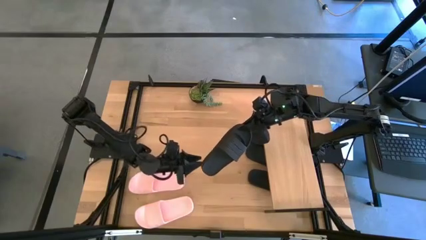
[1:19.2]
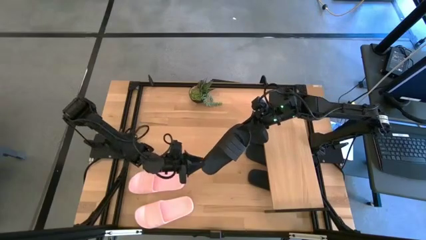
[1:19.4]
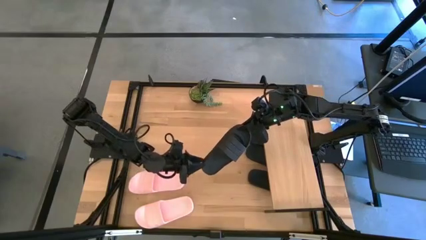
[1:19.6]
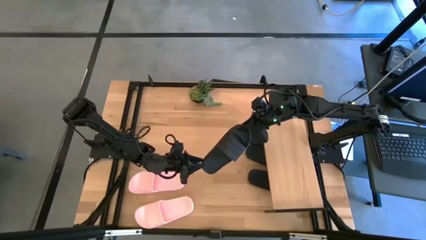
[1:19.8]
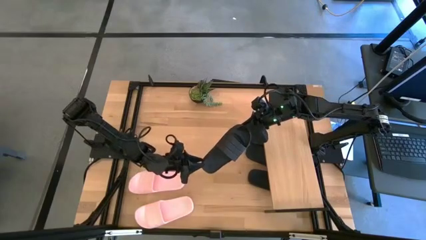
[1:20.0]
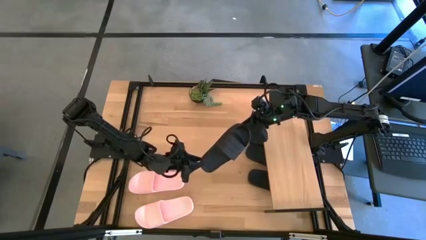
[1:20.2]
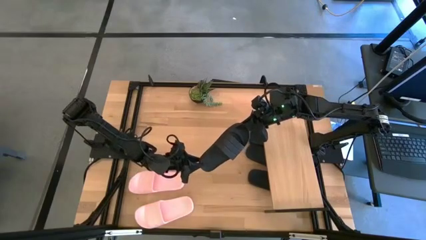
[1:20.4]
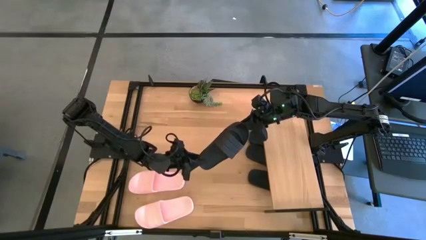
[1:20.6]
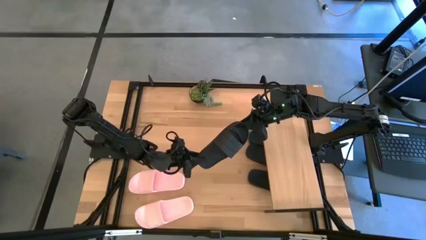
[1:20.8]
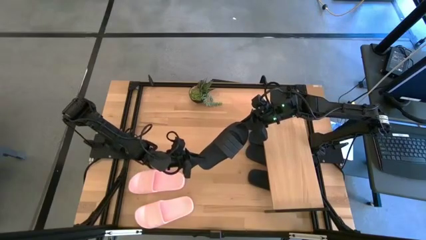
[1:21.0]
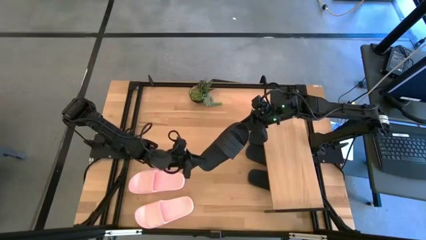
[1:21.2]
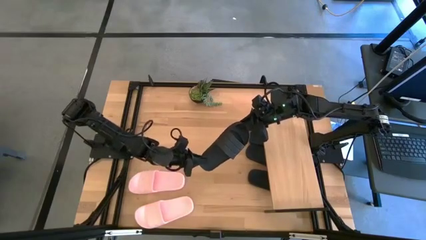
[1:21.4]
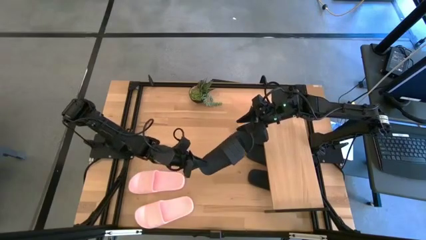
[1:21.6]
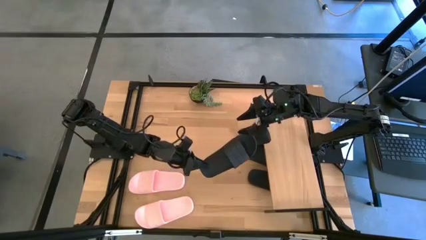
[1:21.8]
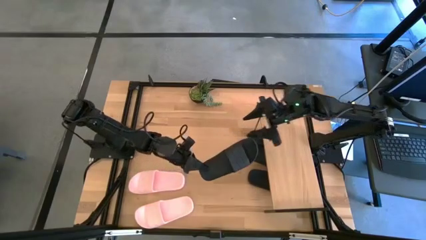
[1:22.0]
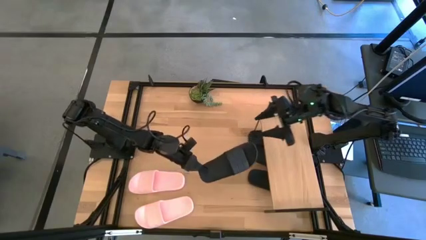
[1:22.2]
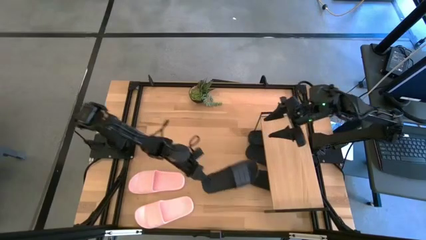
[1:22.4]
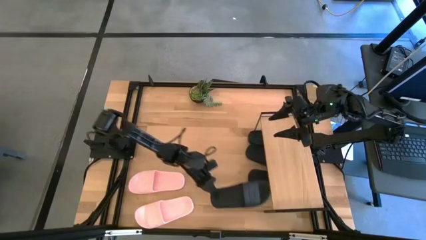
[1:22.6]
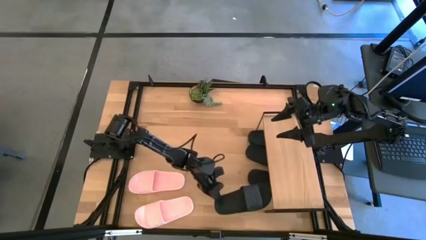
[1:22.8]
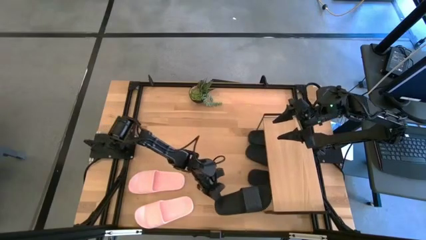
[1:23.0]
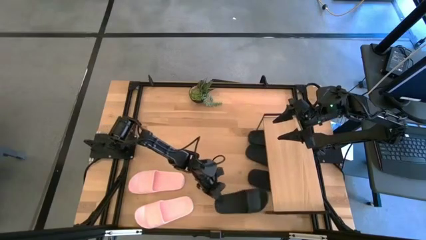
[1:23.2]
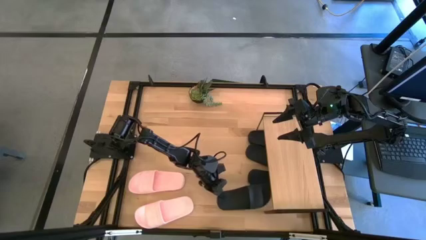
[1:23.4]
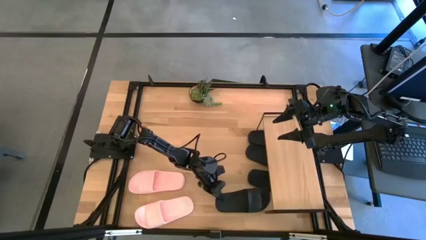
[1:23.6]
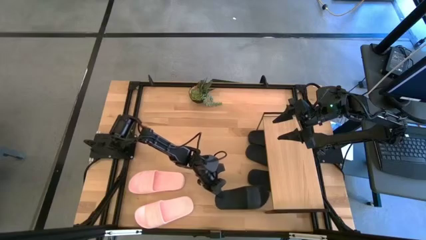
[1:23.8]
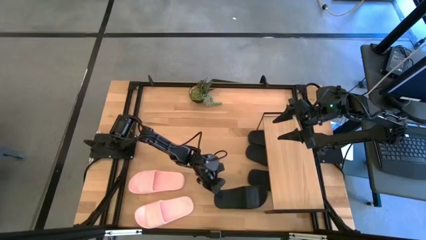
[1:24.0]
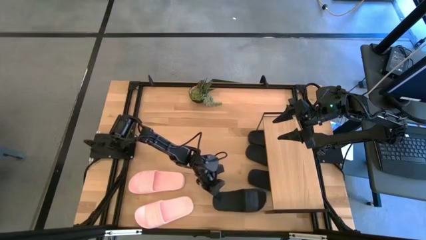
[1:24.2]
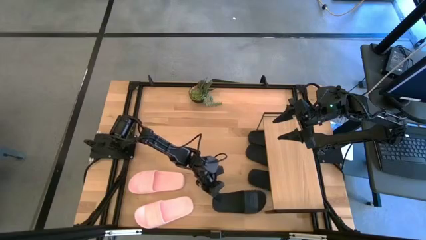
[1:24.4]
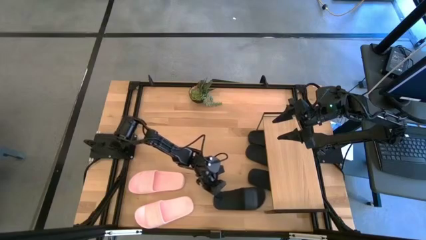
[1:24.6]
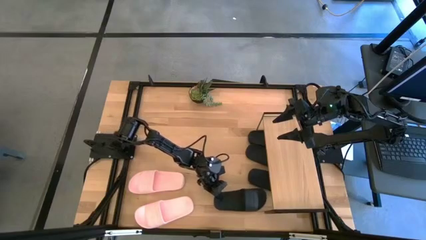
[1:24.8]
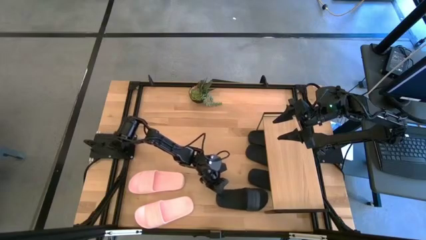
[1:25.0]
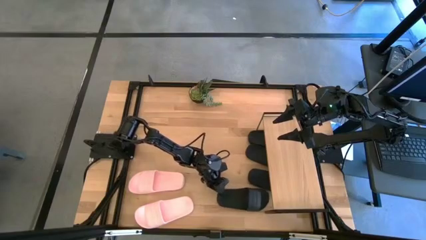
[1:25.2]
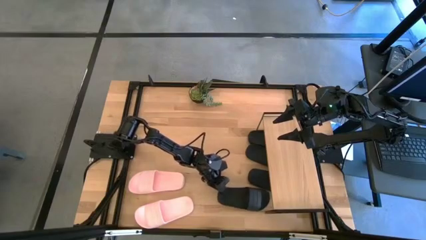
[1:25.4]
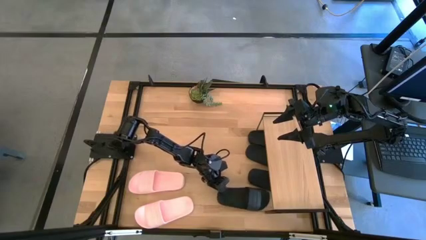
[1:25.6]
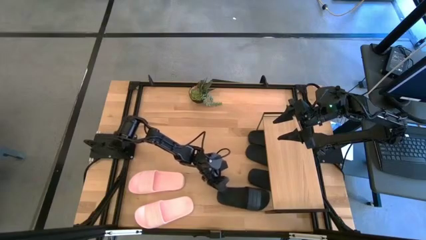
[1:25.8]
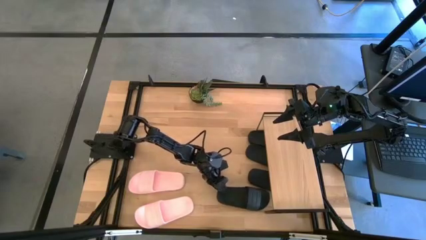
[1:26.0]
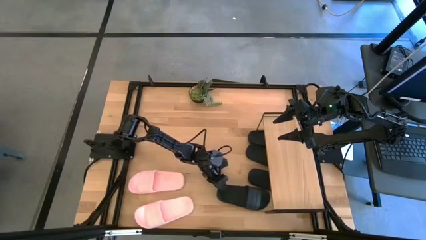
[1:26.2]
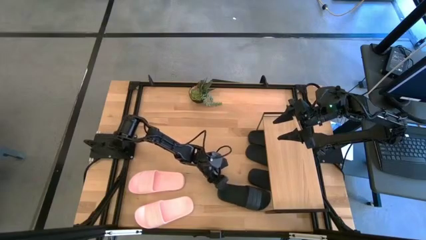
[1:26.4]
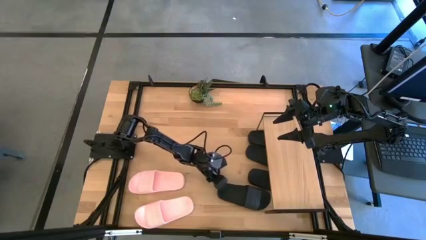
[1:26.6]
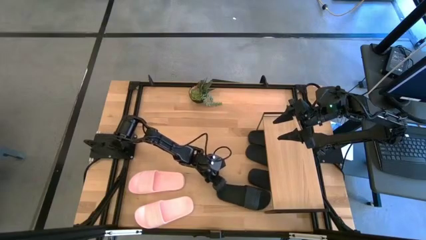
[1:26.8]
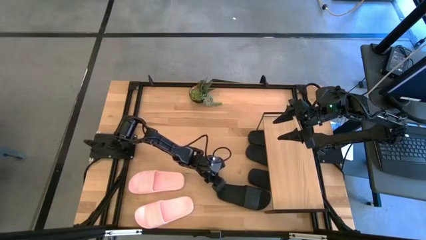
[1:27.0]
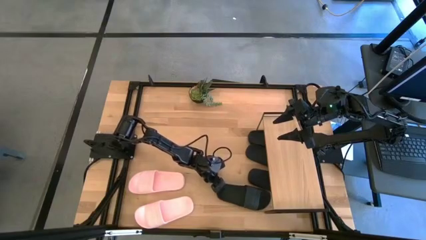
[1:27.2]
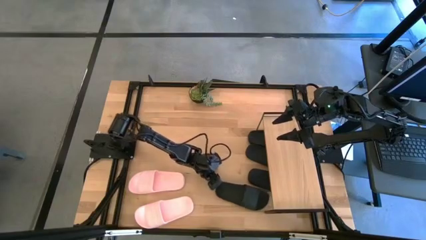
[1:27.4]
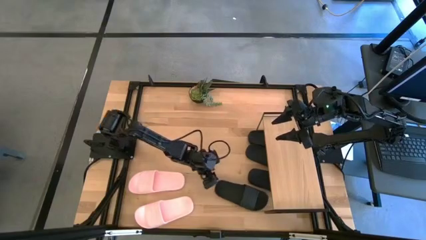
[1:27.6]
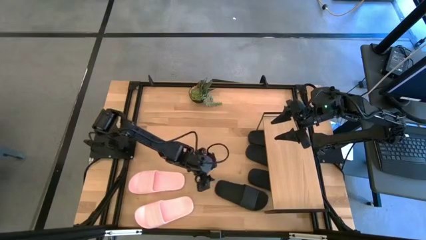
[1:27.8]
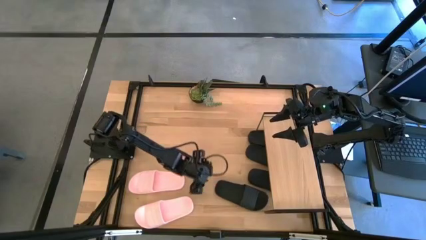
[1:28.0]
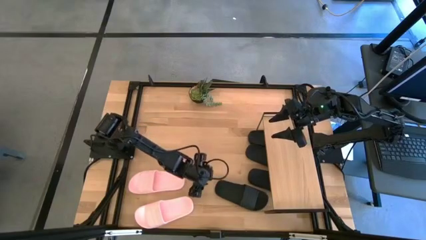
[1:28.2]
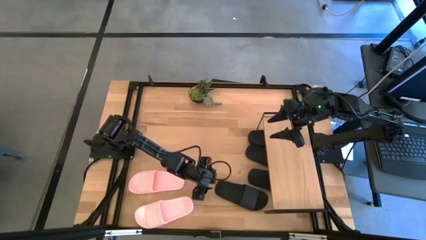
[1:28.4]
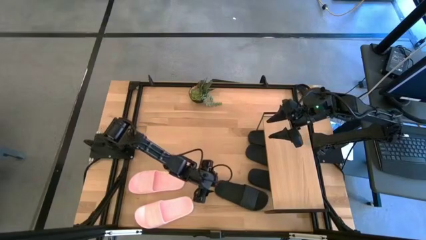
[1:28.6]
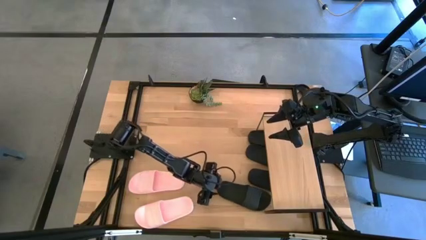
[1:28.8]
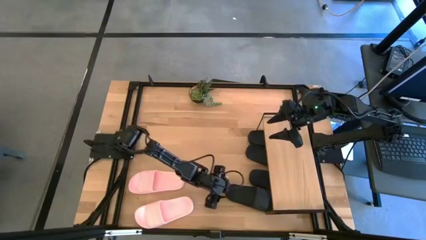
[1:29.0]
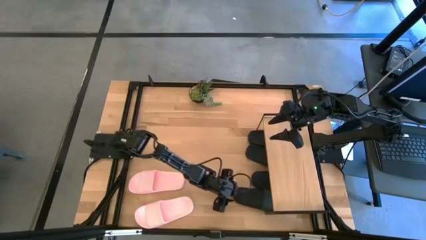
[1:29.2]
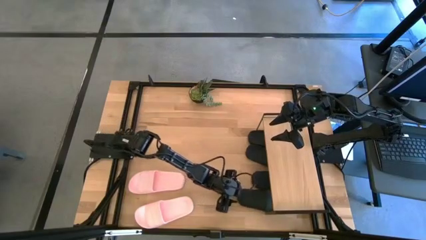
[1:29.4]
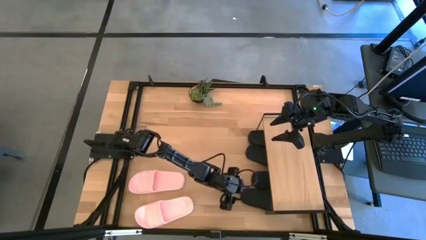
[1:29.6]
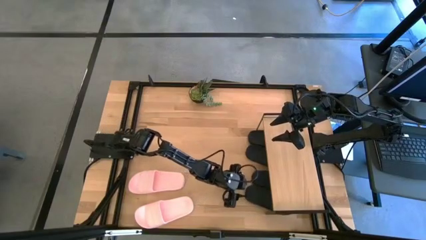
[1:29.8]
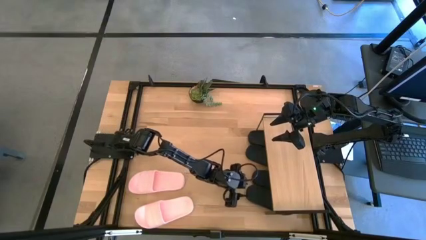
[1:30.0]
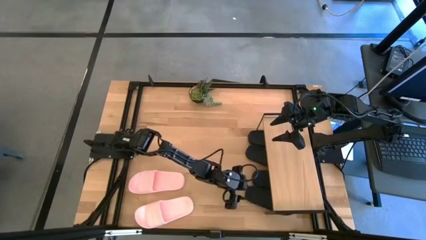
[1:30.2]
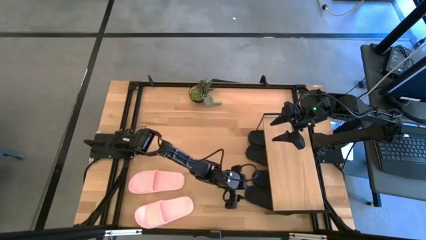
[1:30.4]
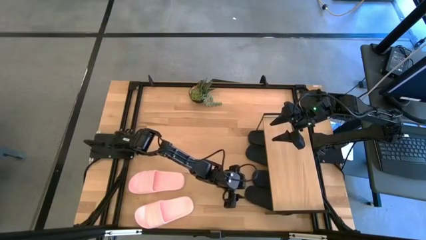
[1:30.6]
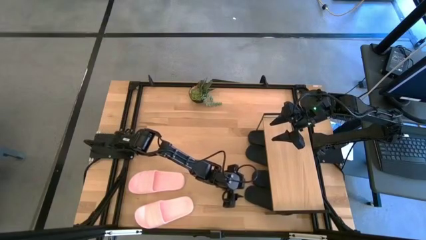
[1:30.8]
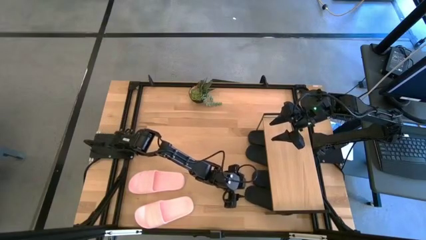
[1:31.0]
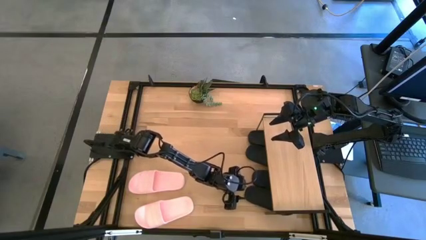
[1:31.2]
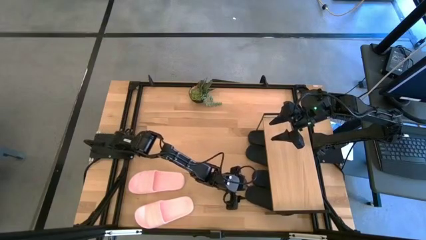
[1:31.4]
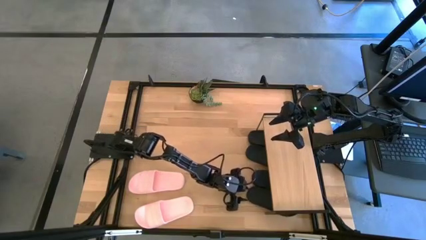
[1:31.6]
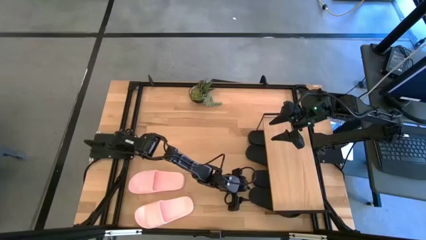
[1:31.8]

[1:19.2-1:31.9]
Task: Pick and place slides into the shelf
Put the black slide under the shelf
